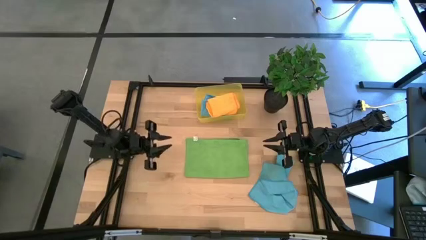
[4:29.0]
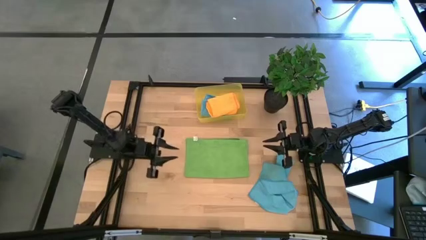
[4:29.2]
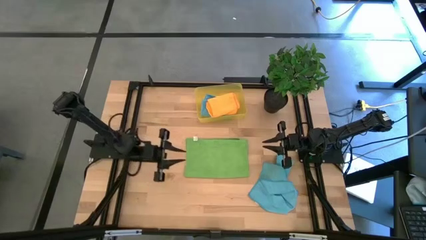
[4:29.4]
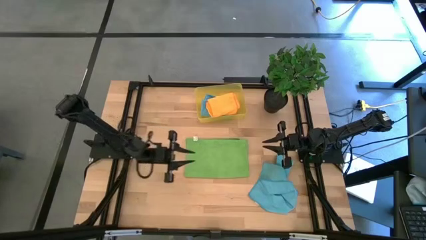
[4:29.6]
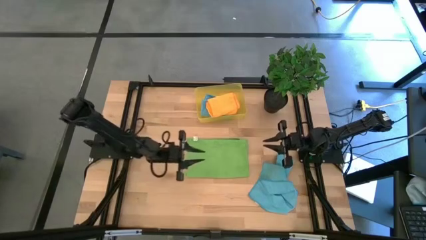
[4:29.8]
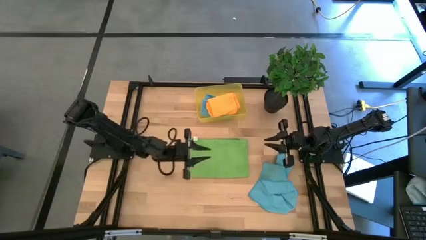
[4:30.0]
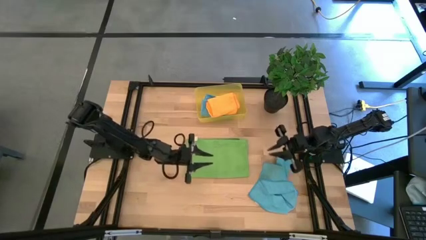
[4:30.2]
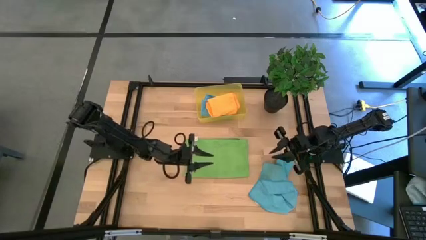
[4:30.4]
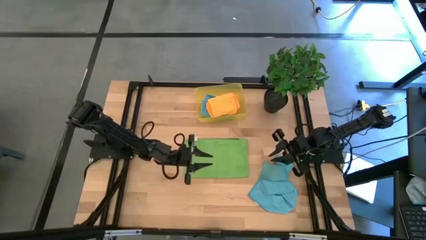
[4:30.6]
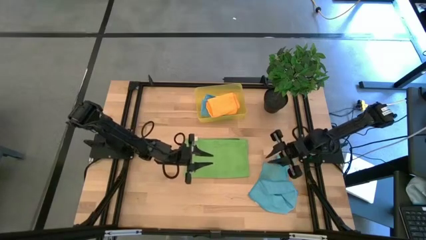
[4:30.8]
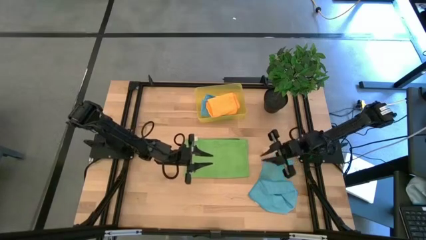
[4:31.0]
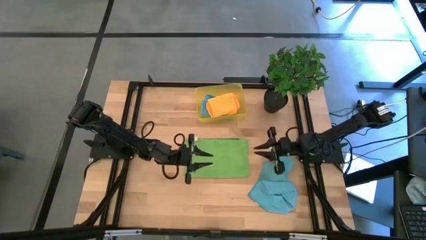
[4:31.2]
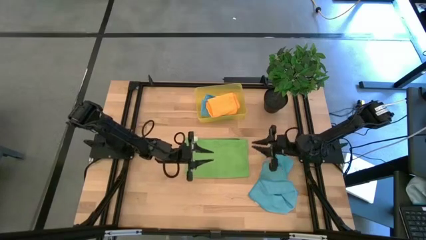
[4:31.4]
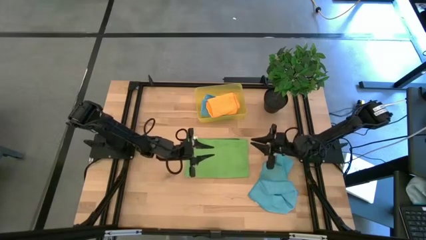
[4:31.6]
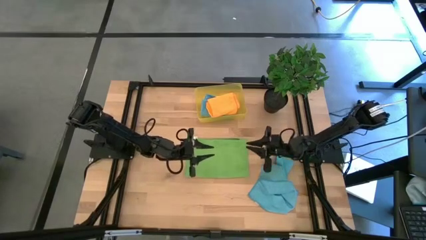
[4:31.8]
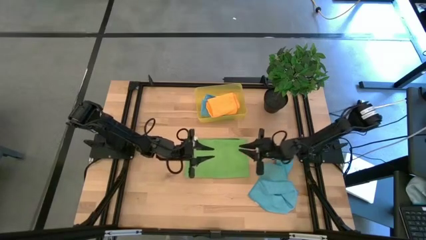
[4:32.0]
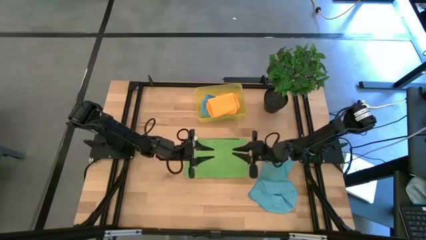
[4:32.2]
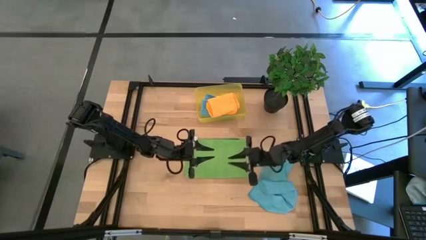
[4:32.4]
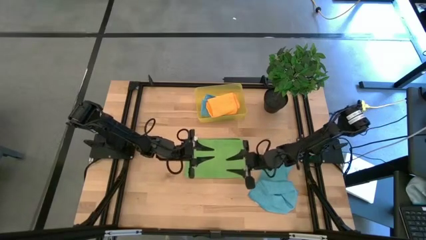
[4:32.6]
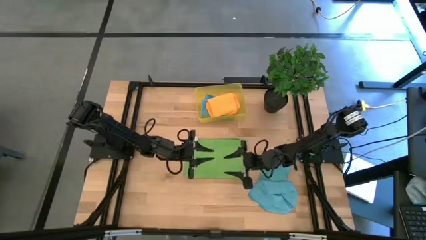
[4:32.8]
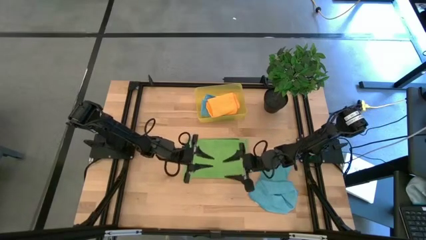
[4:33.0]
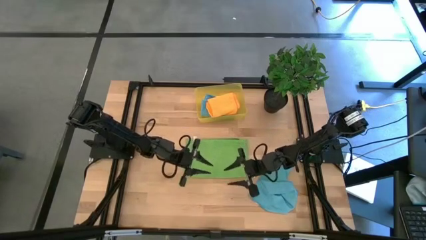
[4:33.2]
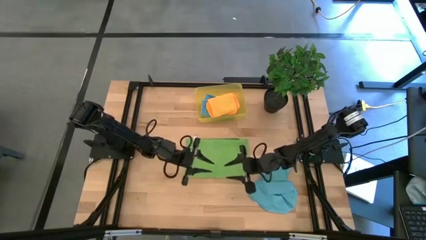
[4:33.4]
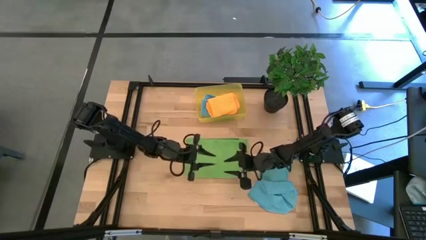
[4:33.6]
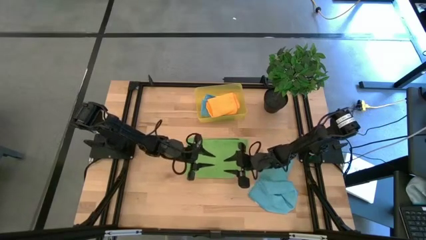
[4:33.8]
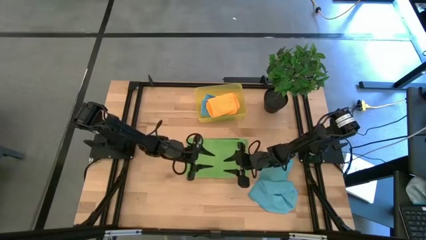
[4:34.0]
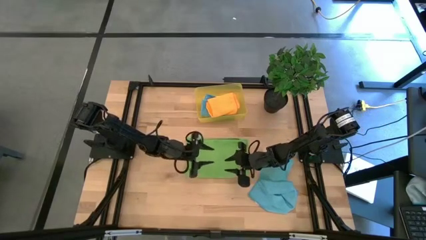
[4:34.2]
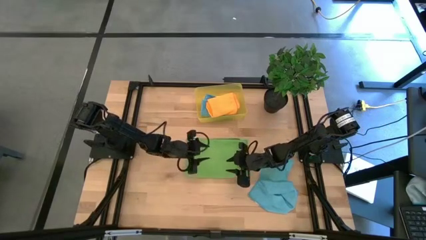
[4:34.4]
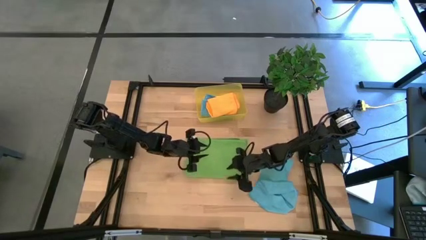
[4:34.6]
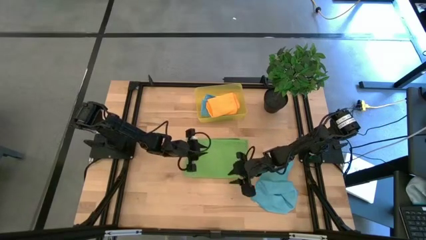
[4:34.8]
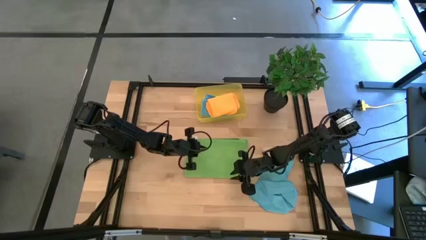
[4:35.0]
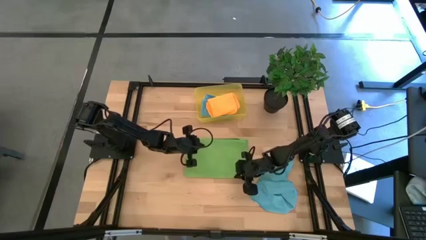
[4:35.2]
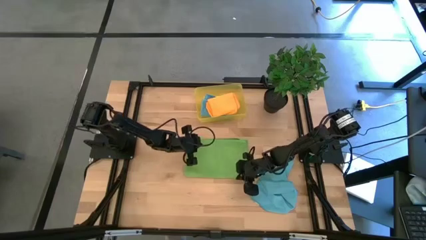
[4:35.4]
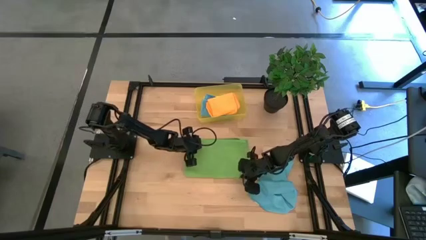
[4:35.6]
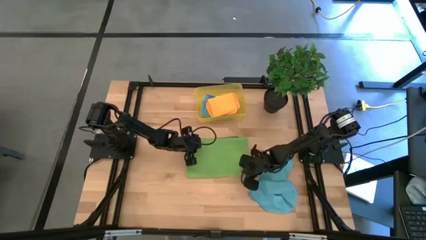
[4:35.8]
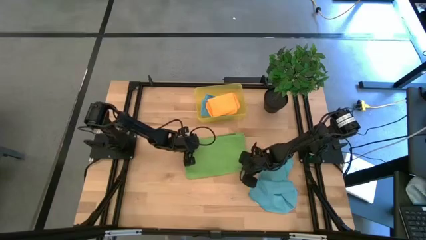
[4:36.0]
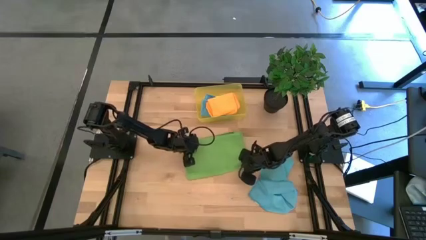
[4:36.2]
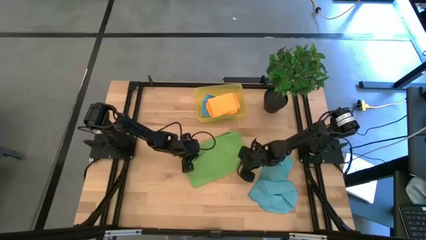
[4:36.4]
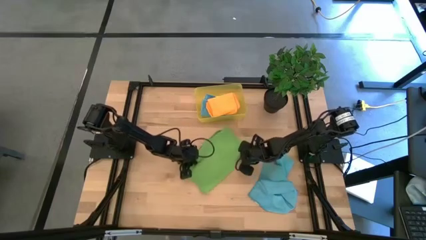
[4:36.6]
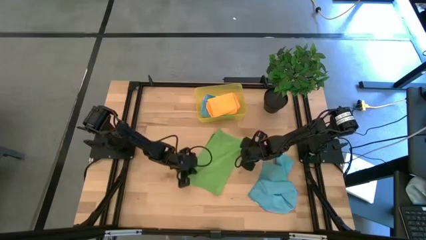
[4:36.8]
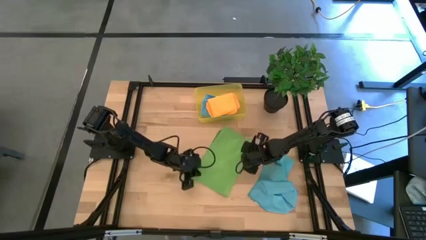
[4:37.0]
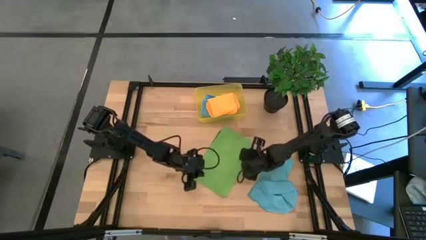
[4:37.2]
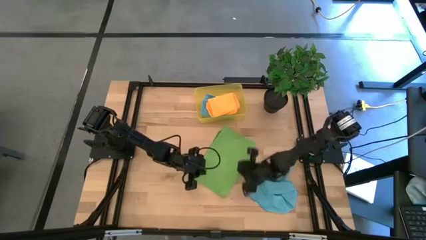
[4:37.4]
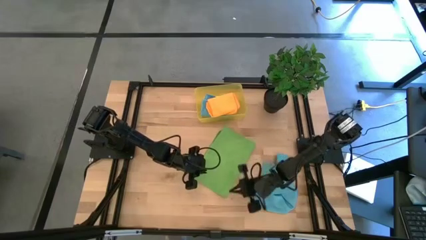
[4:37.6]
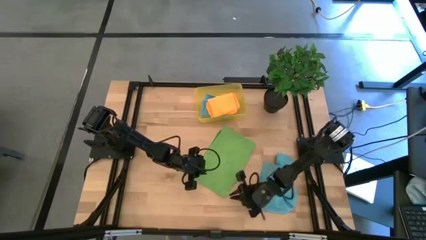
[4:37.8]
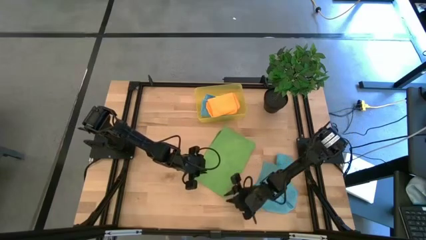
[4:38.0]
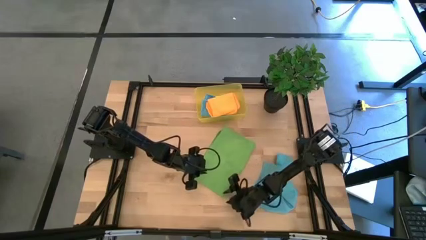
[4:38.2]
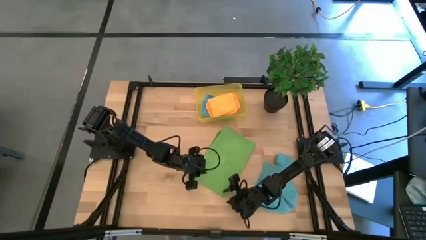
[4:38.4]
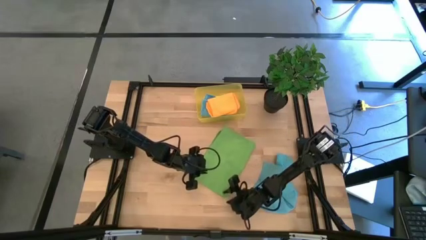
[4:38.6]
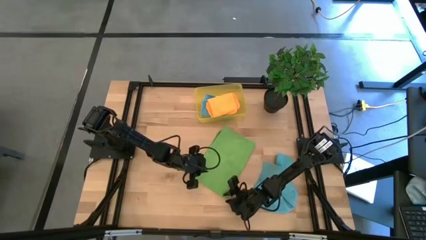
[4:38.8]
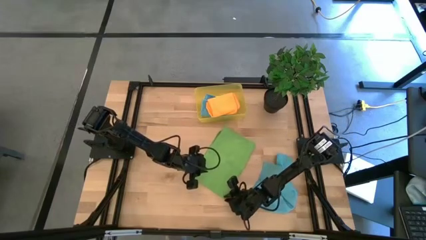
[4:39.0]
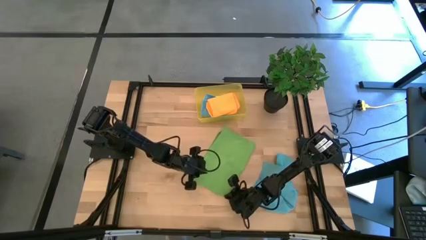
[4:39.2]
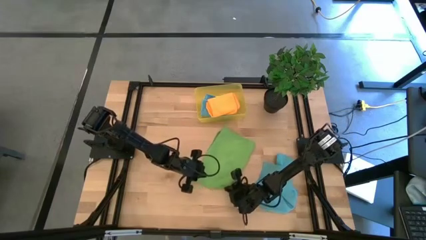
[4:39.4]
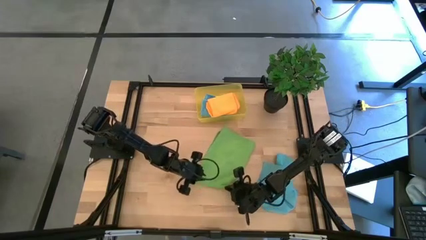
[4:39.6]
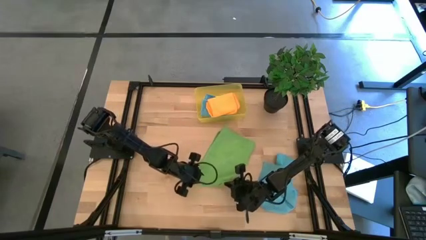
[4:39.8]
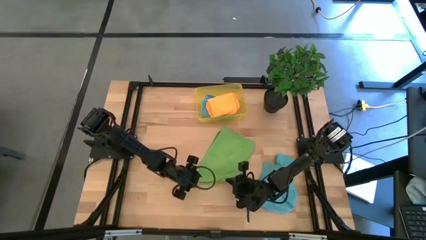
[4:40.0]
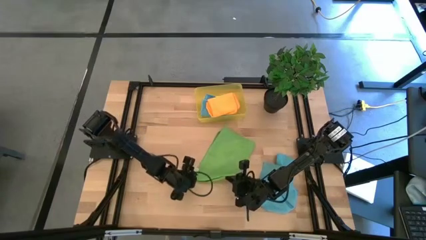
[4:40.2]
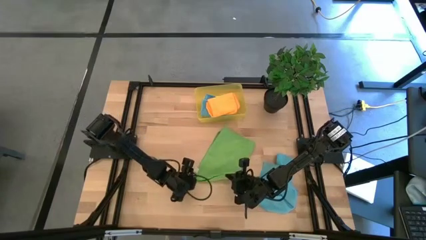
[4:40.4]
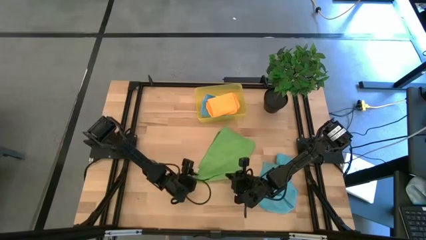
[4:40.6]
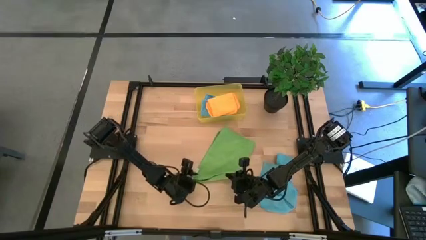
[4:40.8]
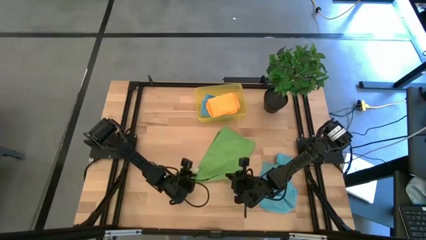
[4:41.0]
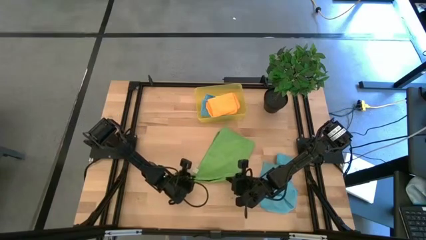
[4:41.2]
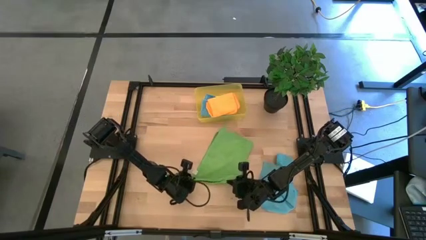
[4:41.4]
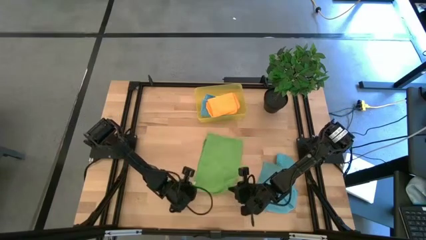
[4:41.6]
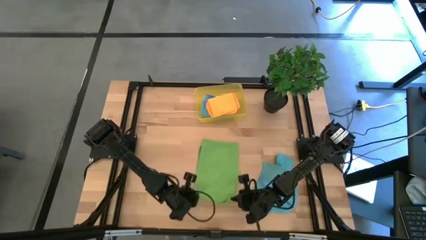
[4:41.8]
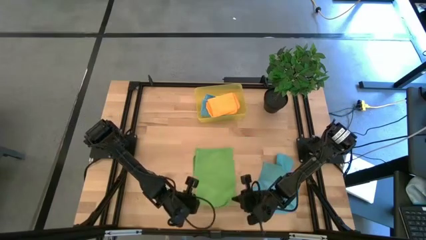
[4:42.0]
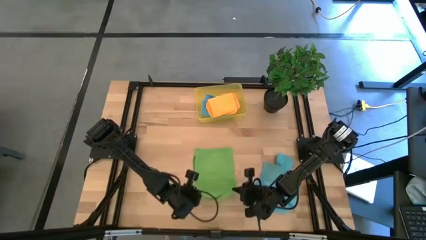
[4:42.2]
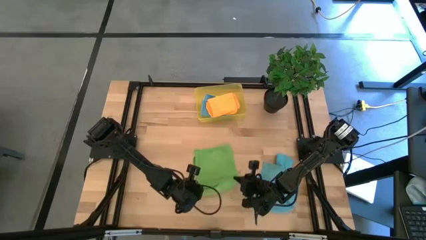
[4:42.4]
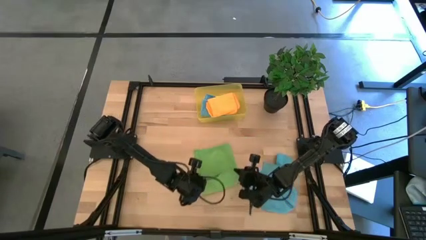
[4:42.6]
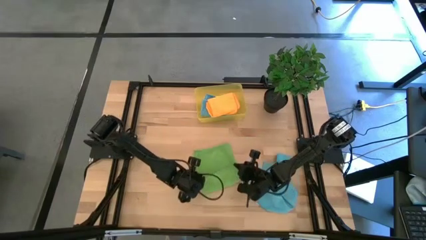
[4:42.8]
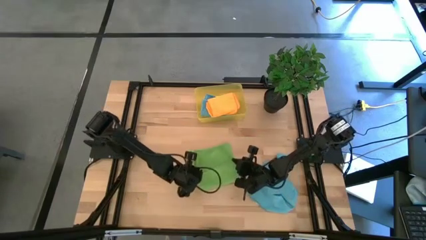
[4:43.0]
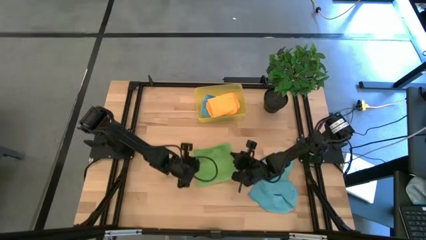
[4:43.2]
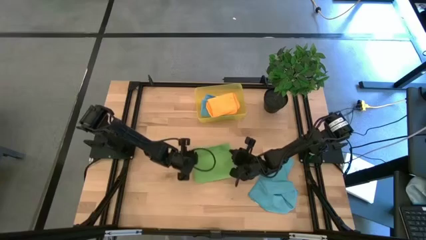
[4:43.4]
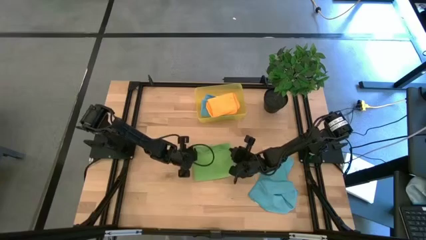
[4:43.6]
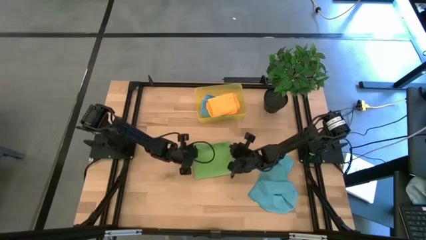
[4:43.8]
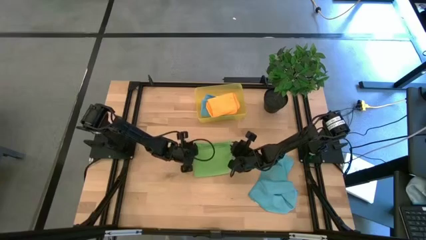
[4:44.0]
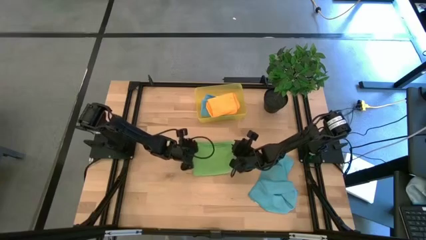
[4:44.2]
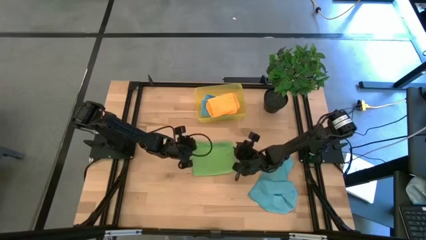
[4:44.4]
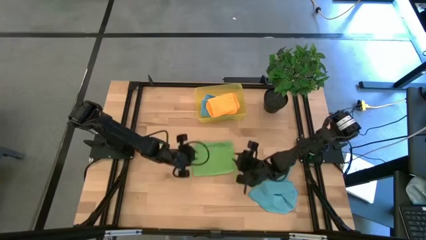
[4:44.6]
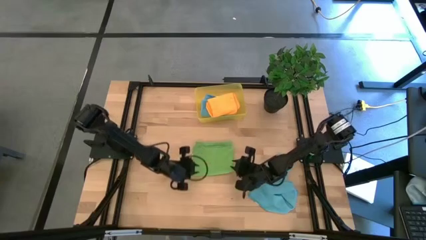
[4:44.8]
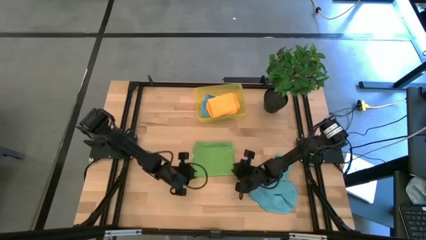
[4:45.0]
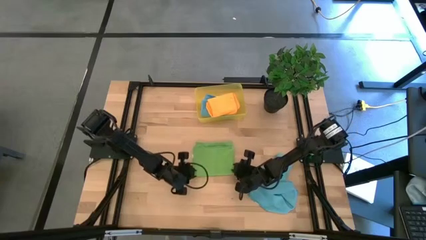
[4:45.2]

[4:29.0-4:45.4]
Task: Fold microfiber towels
Fold the green microfiber towel
